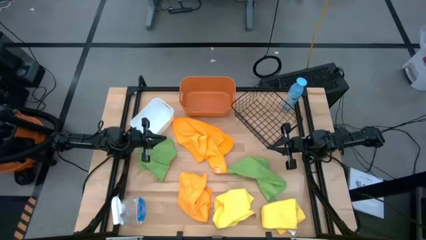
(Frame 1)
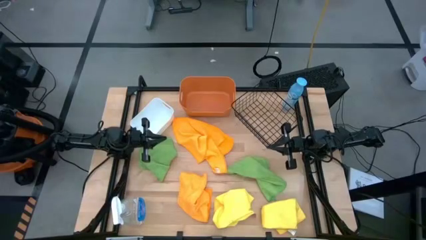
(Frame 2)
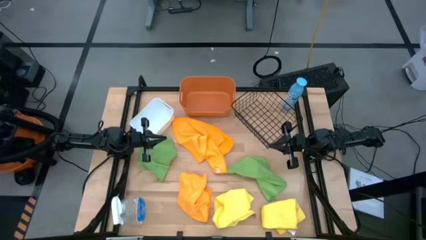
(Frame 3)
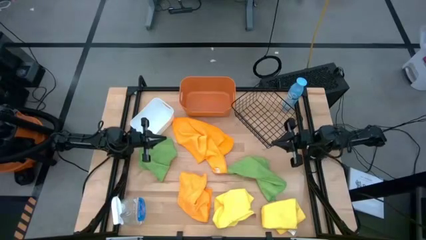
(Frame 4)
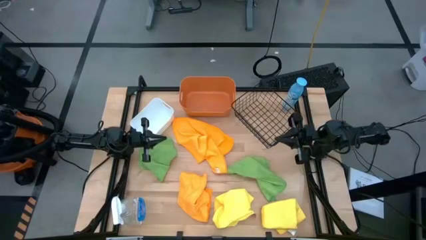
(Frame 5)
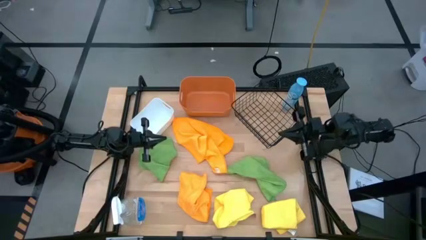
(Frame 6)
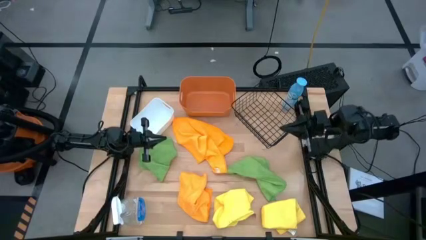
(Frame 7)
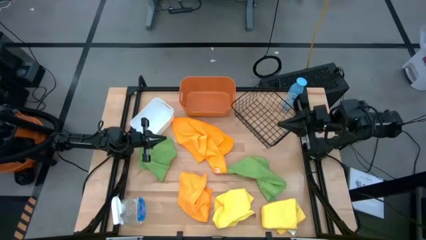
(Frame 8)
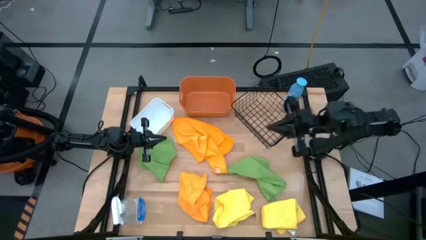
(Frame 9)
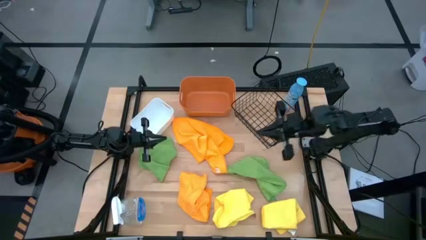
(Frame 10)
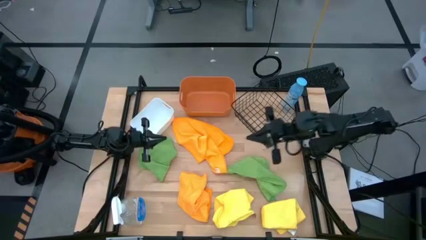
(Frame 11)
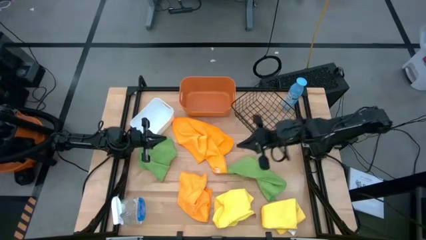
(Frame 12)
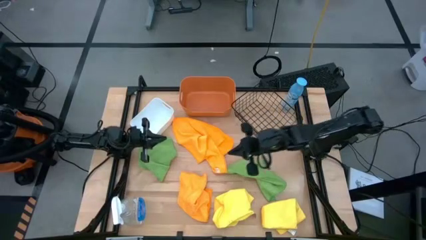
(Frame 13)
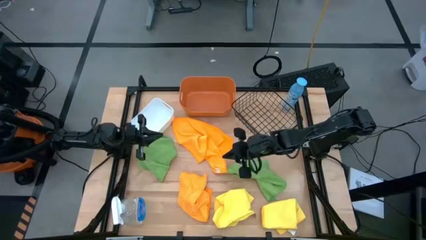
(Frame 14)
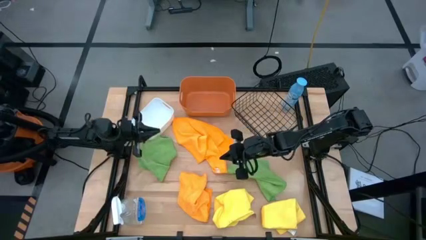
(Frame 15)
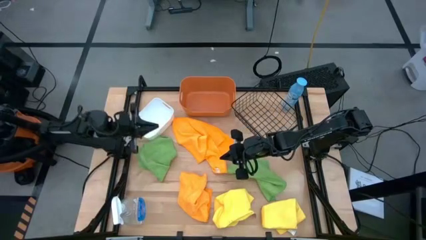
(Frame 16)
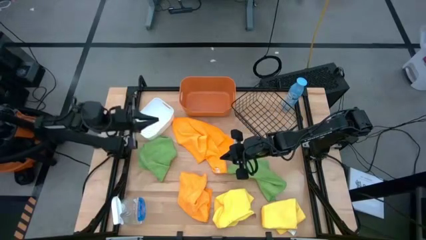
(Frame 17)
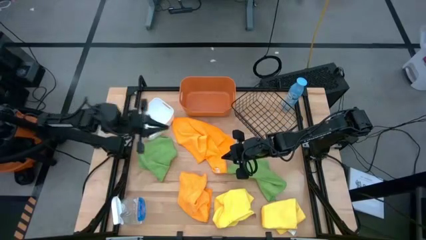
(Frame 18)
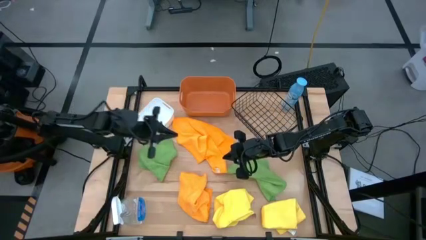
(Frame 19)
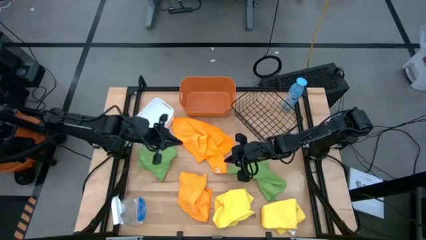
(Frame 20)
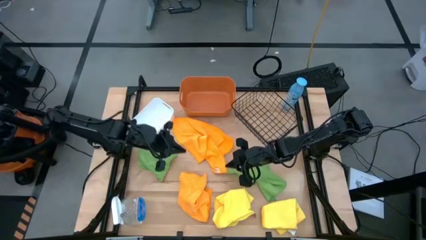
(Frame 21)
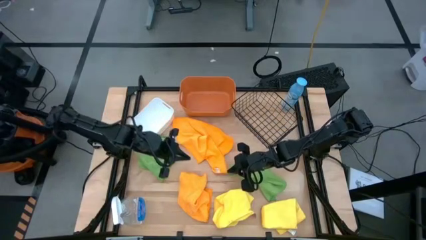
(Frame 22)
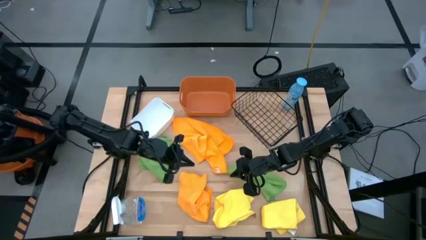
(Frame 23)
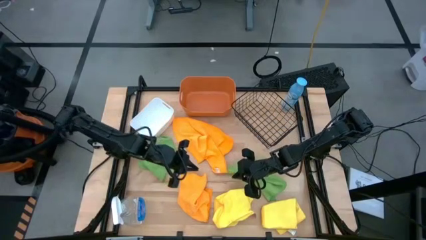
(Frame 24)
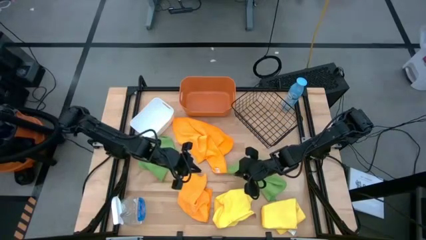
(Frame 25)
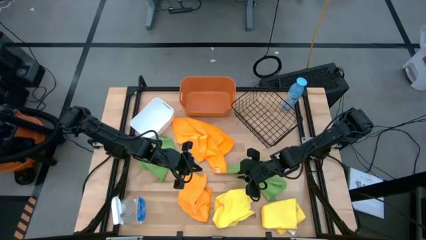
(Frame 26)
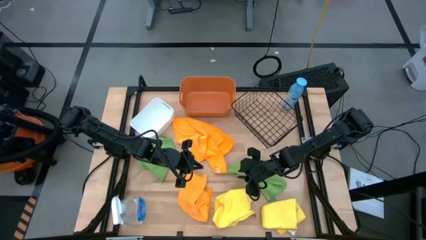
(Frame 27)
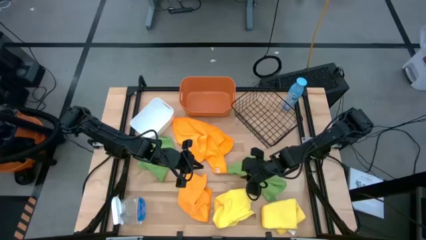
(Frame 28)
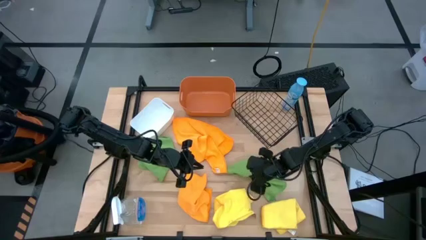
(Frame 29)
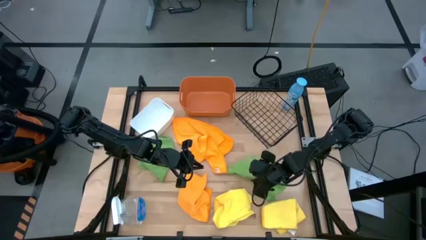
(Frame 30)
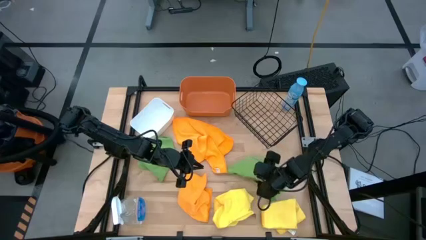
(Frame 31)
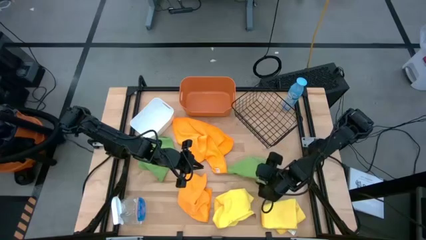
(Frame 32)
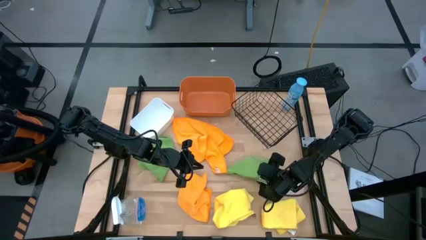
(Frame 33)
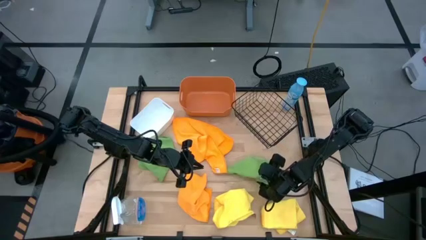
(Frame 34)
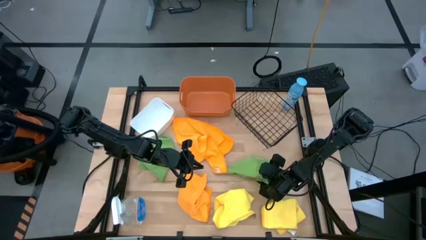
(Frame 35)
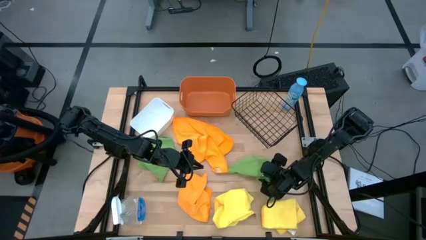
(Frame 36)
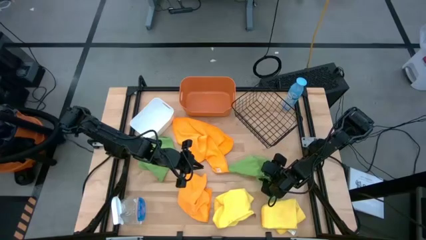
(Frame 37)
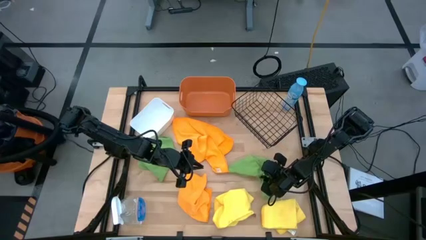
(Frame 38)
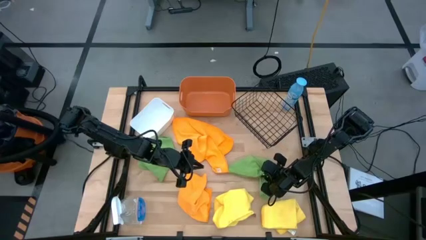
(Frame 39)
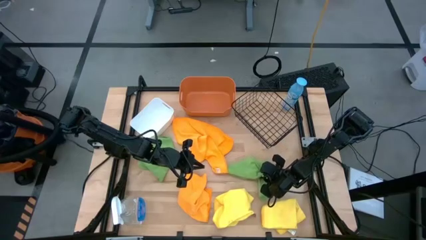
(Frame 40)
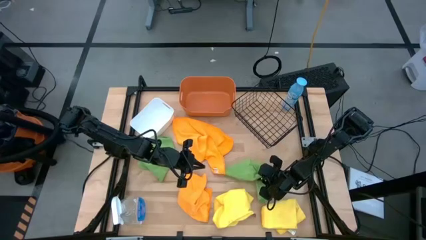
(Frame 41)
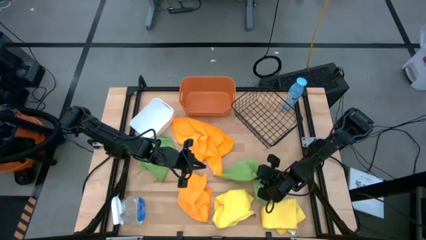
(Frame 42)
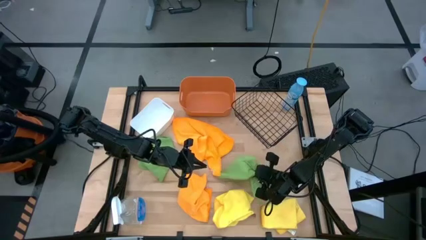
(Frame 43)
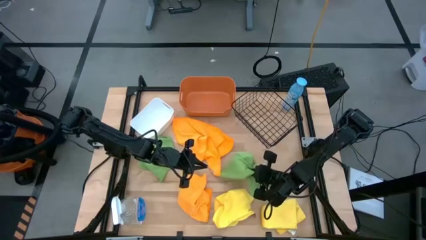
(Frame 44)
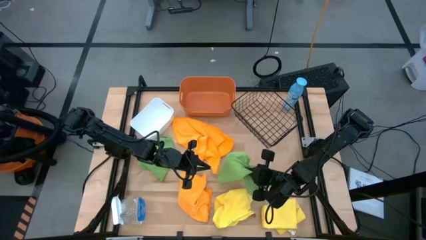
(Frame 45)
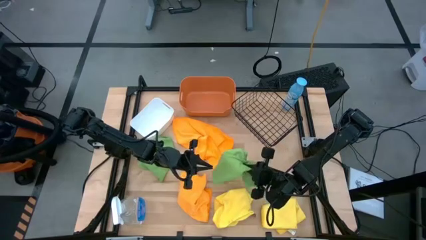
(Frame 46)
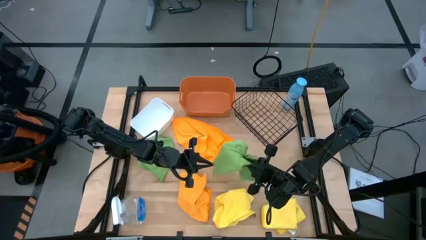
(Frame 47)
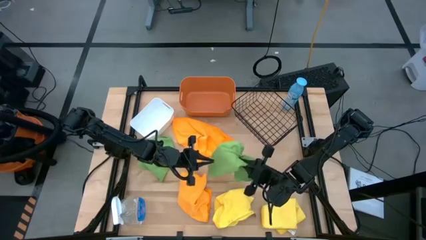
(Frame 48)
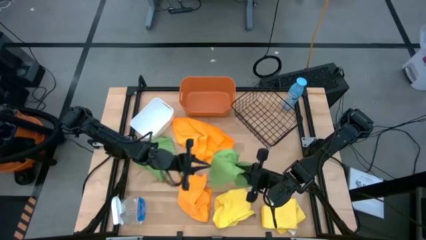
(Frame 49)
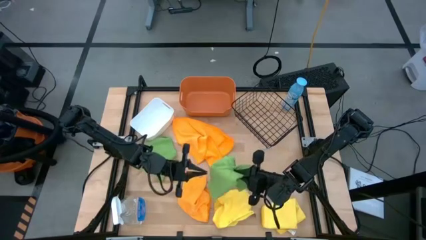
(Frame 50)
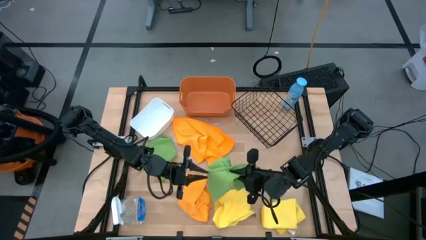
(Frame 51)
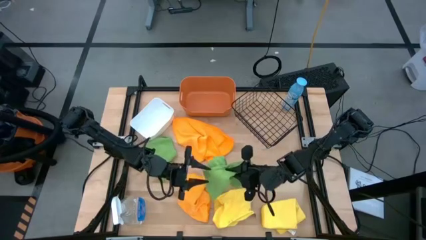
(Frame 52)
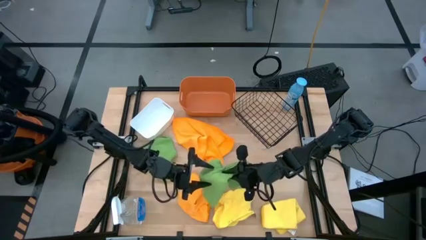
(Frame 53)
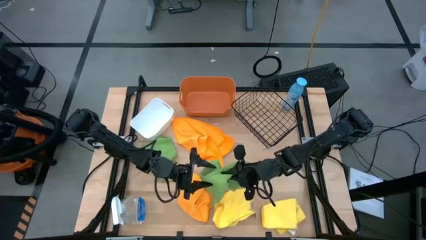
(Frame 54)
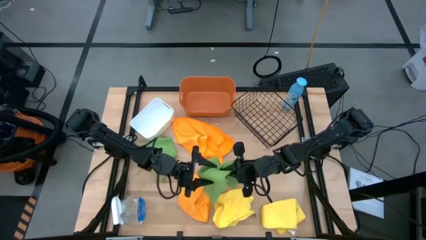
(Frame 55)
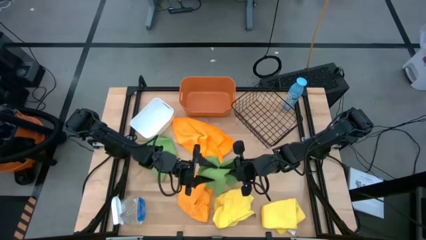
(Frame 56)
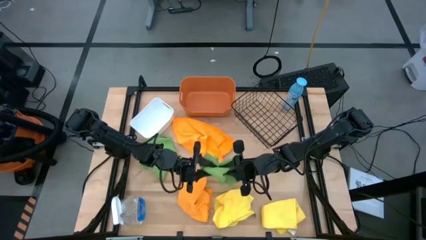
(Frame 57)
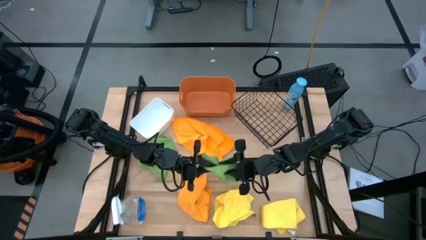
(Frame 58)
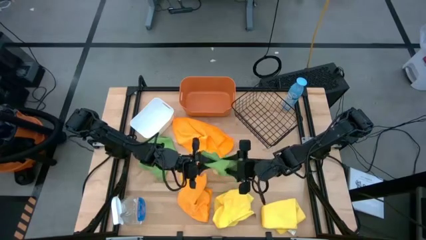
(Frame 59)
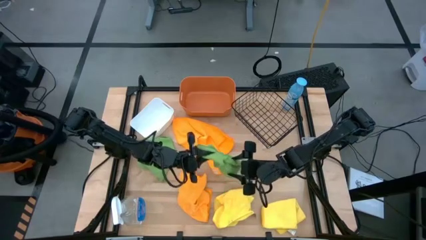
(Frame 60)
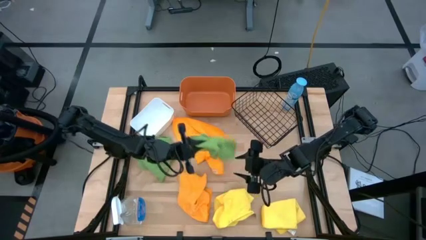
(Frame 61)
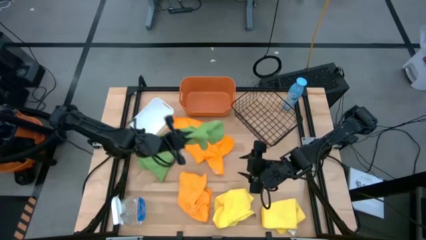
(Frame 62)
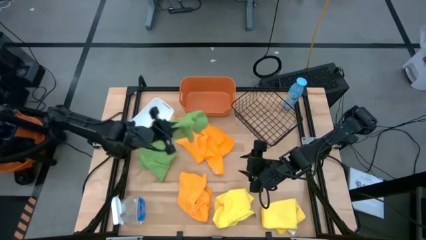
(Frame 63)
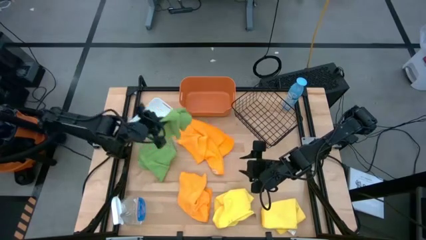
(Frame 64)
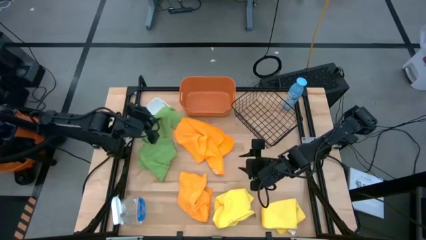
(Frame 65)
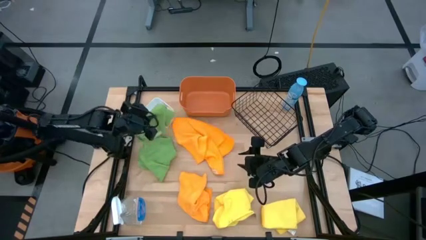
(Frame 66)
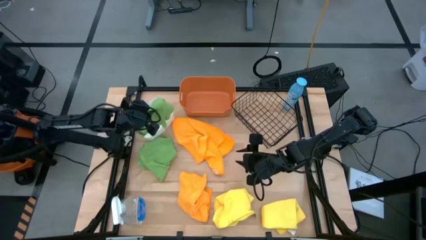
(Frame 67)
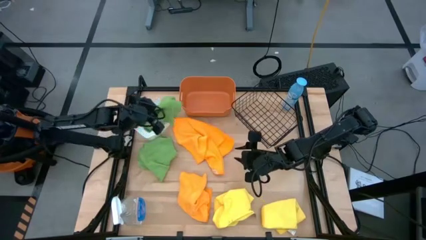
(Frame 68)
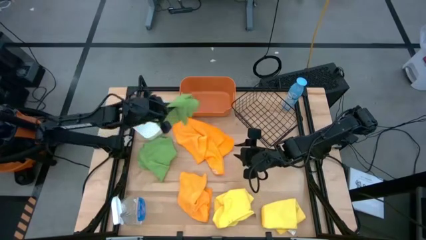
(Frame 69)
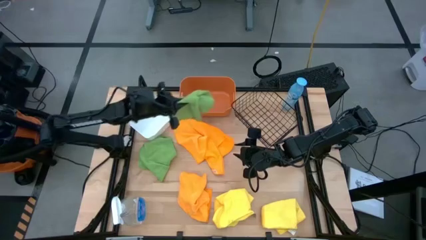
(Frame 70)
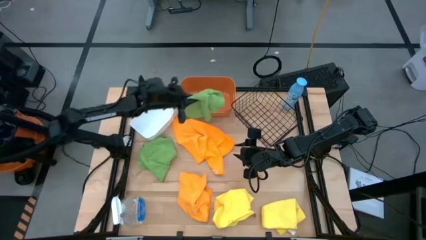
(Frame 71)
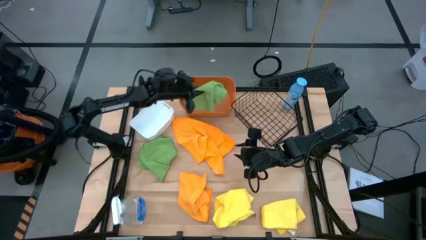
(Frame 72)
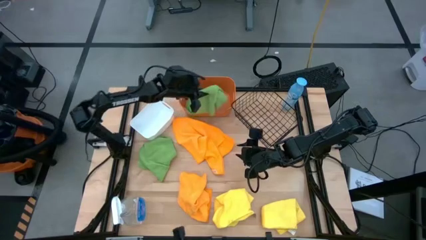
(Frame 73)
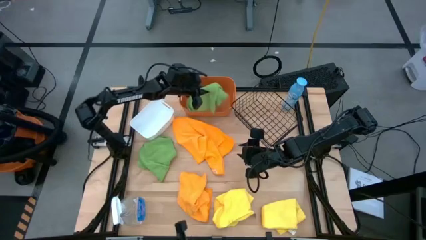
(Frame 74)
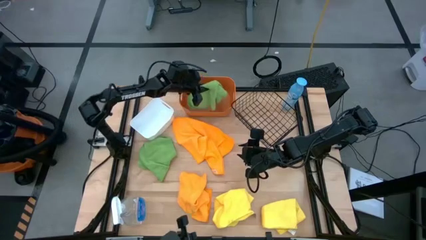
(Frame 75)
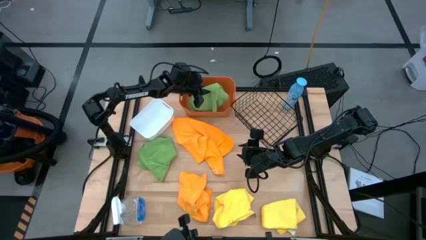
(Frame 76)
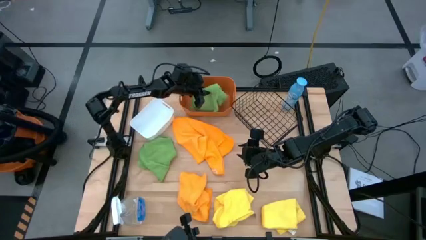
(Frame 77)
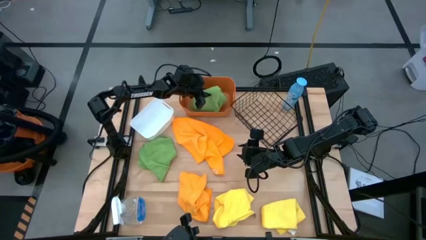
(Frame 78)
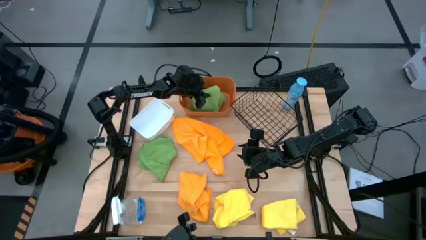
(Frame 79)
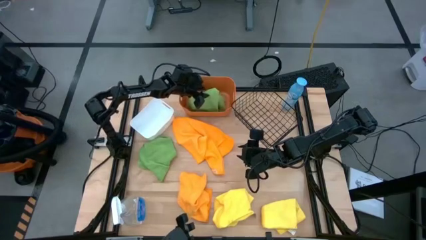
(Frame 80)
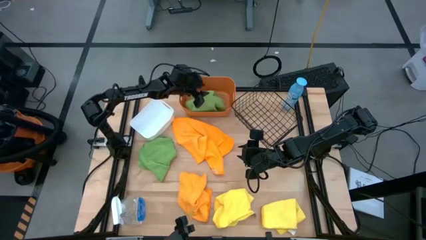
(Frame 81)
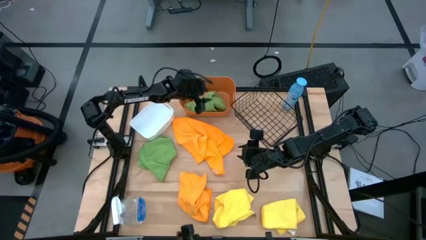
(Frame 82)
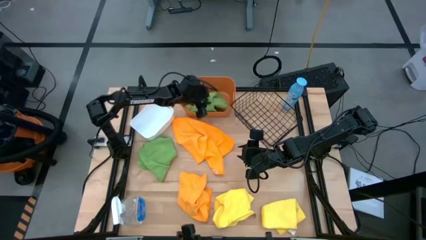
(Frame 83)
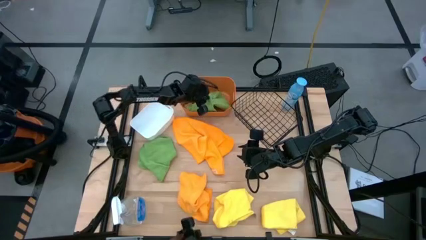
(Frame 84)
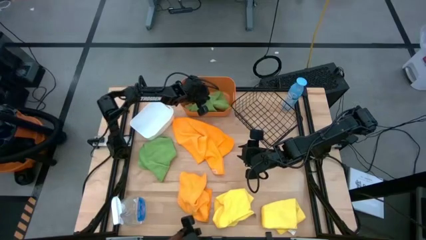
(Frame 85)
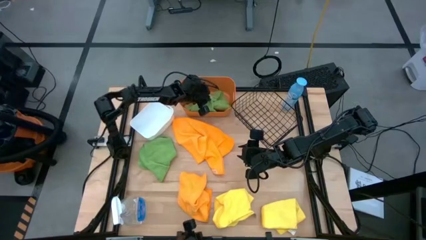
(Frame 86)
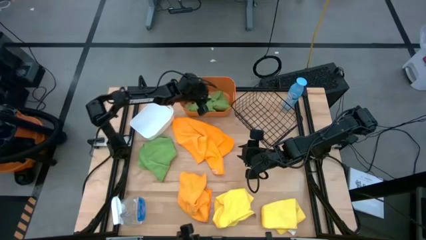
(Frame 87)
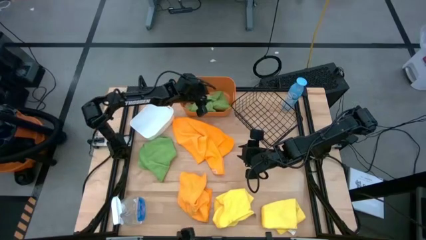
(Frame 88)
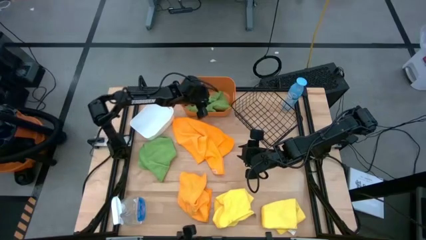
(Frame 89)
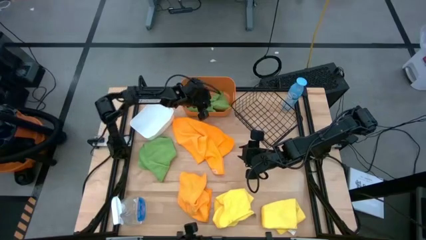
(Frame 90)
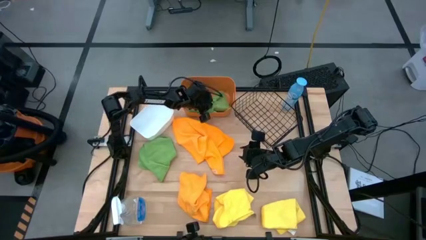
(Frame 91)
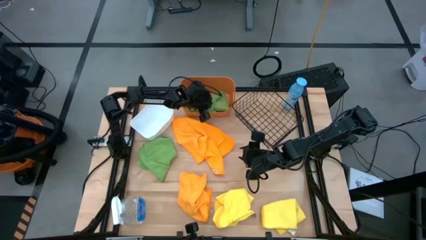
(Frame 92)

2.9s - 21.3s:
Task: Sort microfiber towel by color & place in baskets
Put the right green towel into the orange bin
